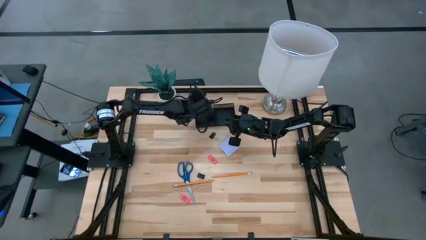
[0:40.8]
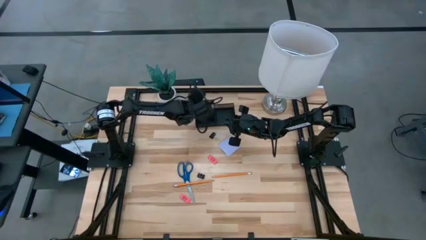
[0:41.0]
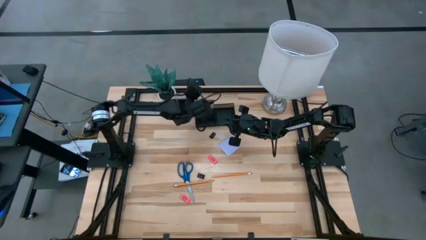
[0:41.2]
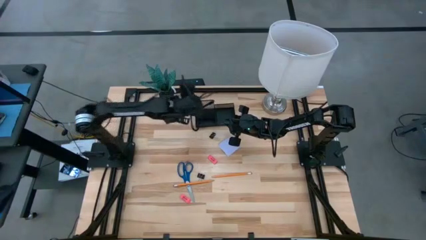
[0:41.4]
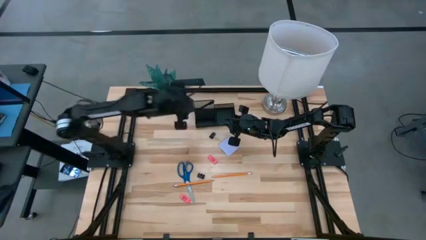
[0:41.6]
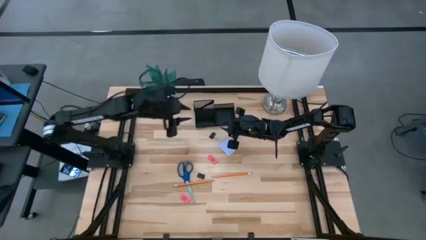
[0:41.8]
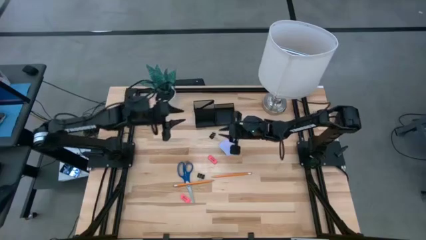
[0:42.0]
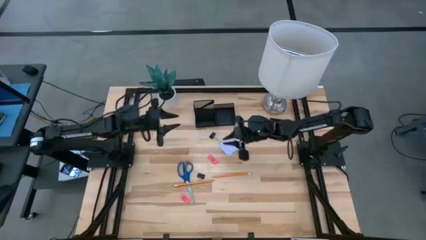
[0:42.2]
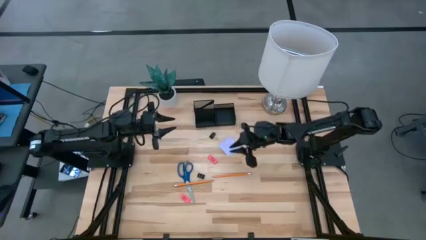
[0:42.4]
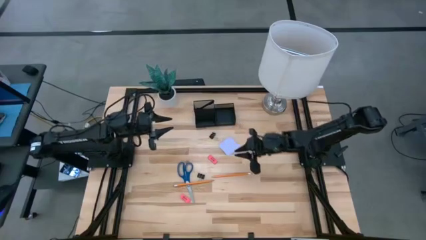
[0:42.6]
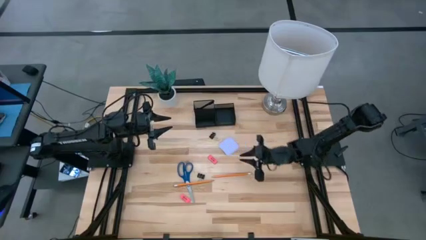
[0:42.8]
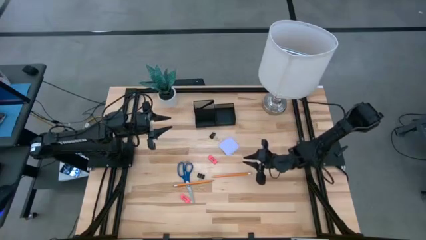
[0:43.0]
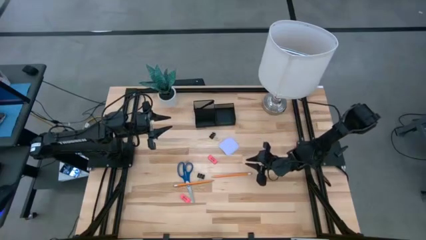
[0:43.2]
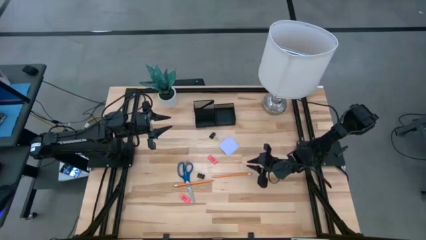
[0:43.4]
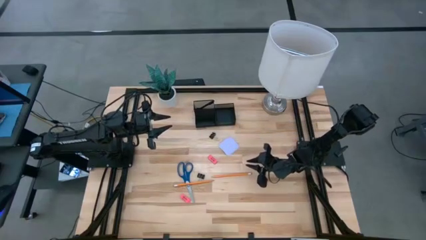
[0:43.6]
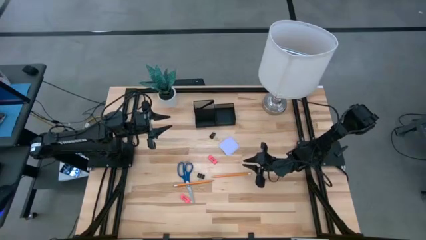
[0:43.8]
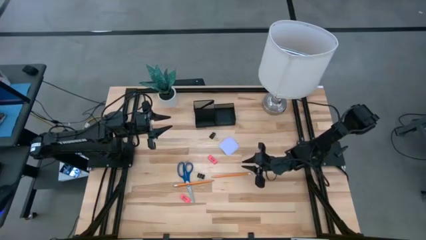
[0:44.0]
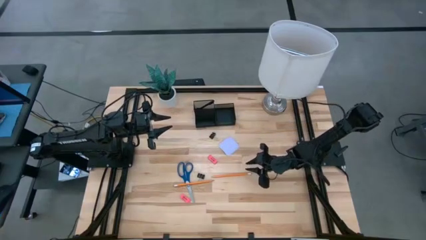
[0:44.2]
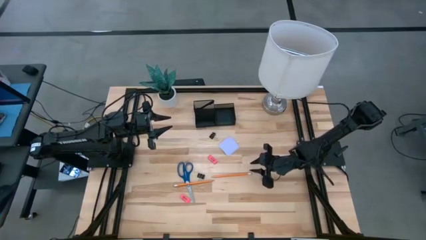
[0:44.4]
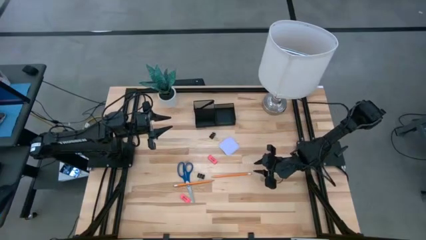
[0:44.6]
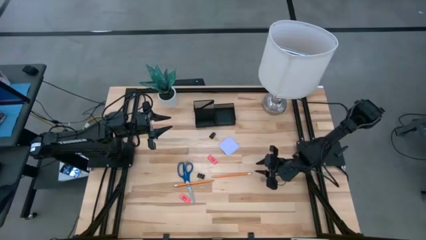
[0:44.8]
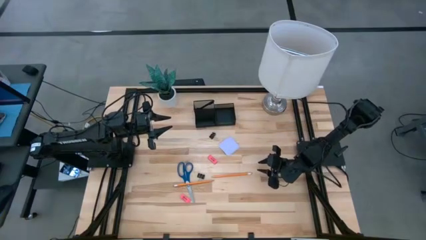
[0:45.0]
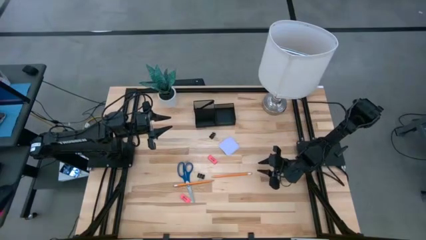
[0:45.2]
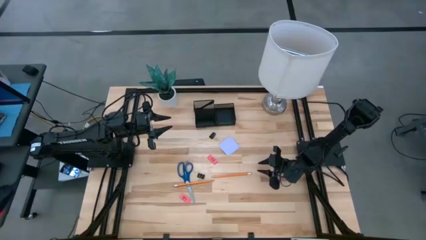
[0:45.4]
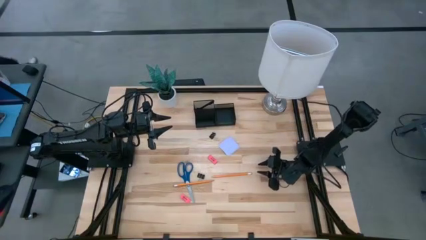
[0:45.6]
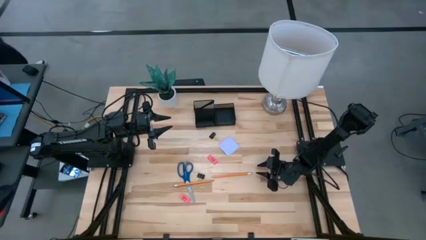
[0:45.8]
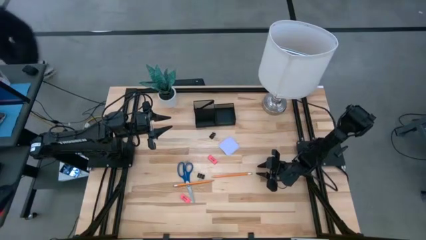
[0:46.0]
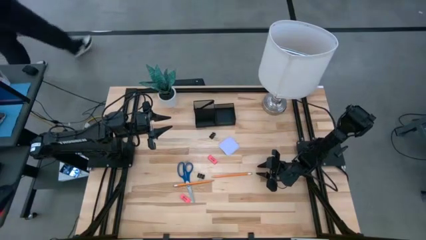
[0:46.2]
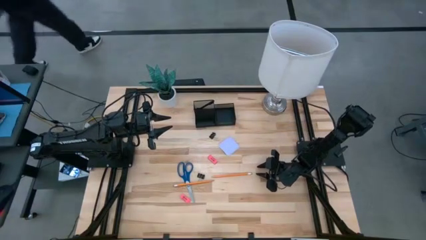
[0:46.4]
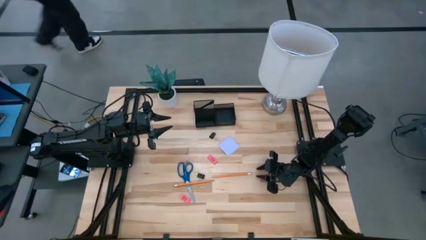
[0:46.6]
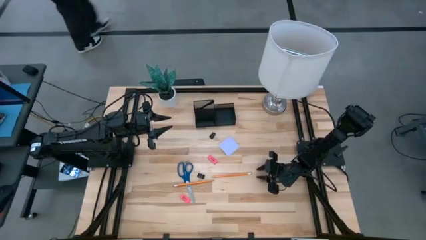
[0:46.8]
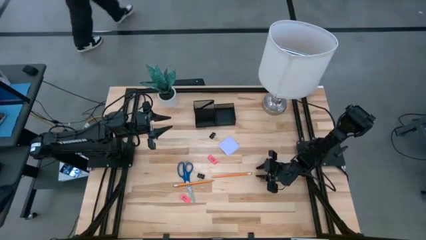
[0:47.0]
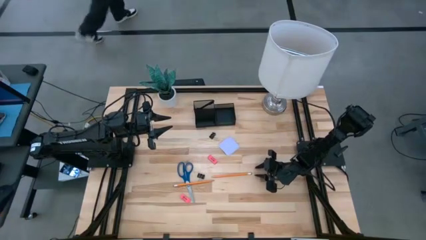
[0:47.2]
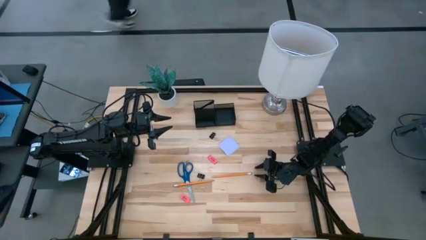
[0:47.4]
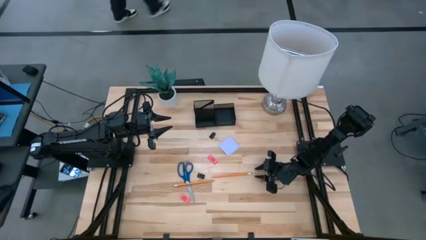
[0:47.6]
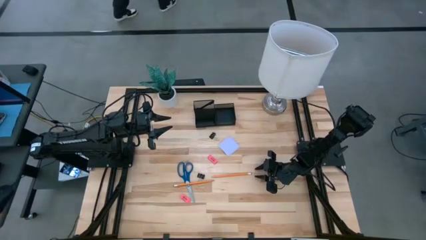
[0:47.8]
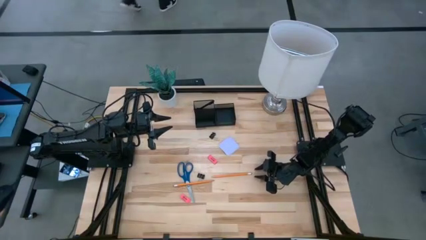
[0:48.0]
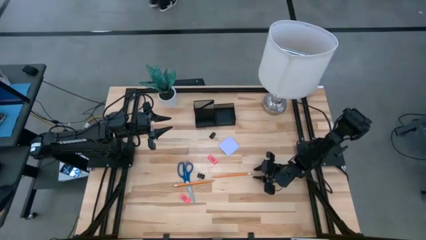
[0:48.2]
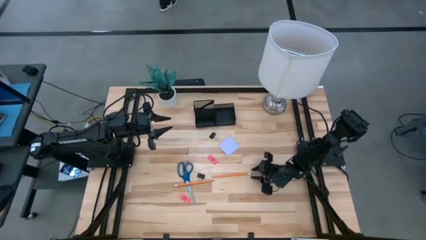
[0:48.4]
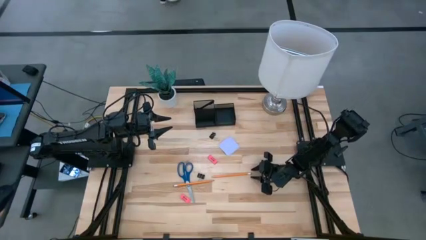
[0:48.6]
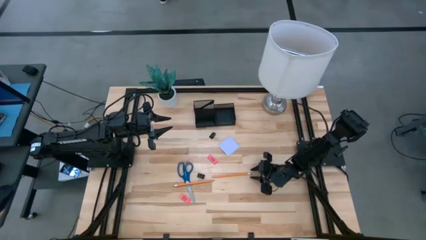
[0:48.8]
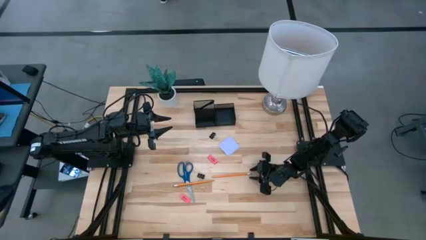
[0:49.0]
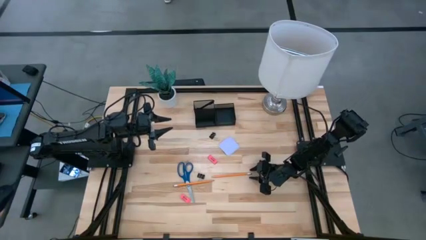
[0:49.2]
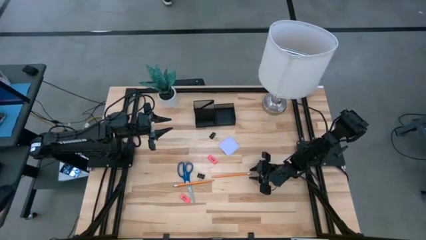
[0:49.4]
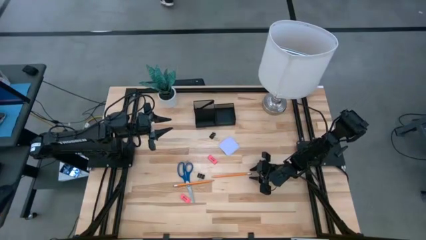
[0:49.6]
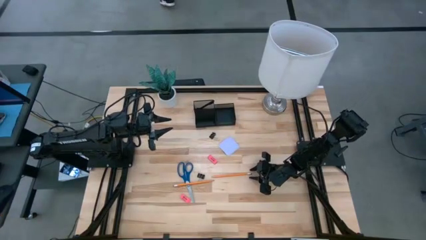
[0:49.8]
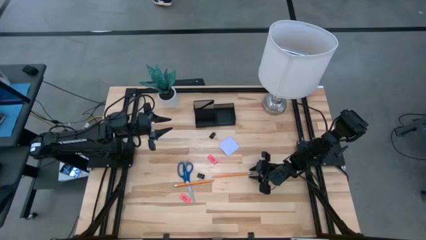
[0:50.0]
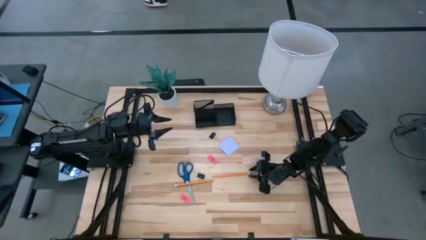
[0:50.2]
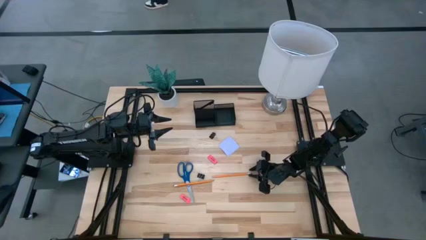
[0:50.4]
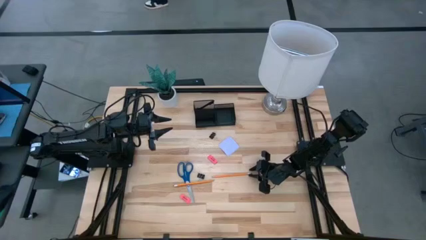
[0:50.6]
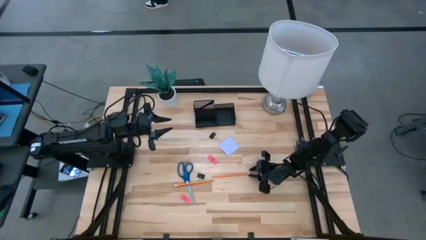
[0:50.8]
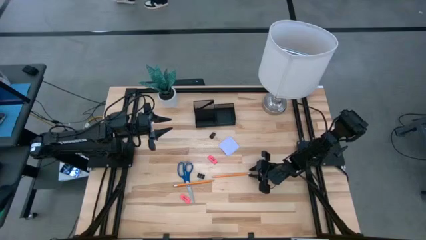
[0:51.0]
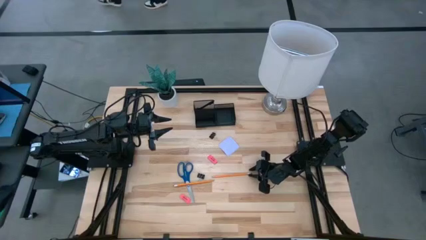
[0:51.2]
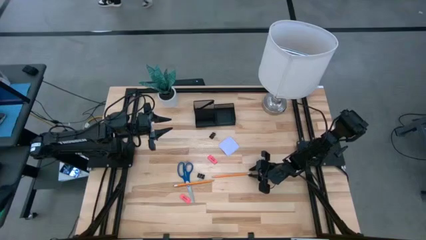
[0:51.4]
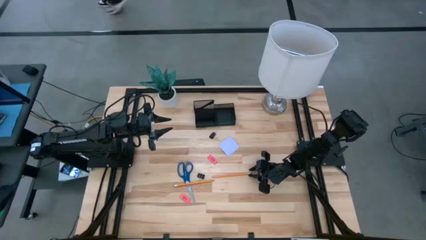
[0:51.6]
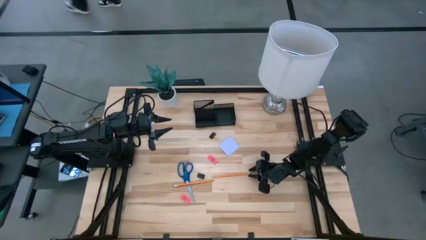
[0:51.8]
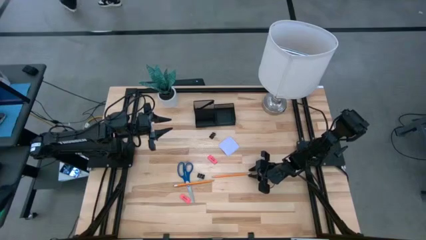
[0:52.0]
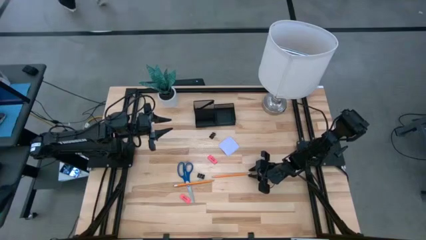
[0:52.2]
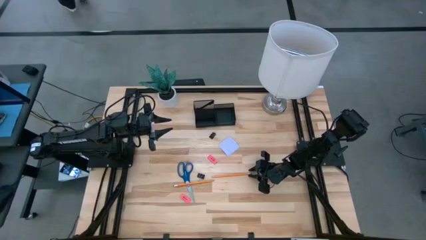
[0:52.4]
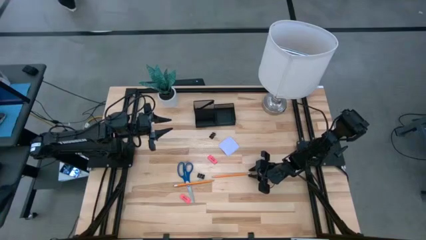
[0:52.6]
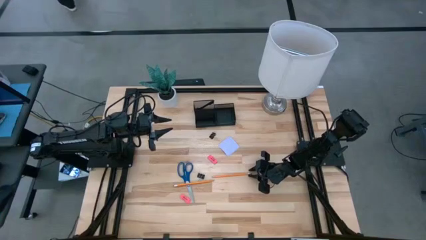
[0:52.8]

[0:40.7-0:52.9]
Task: Pick and place office supplies into organizer
Put the right orange pencil into the black desk organizer
